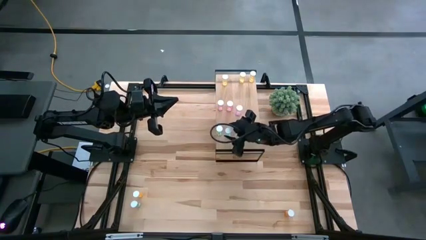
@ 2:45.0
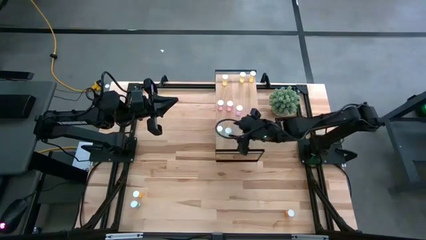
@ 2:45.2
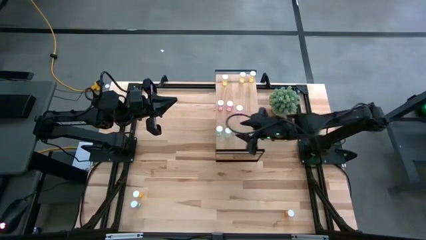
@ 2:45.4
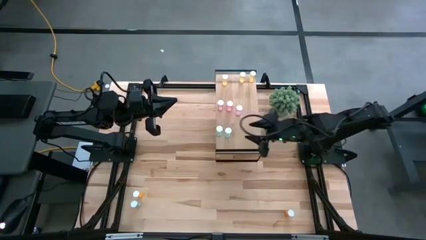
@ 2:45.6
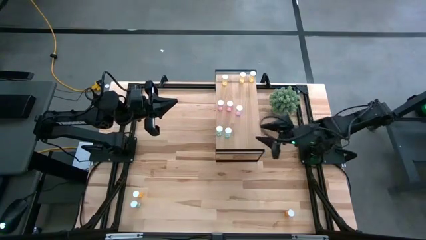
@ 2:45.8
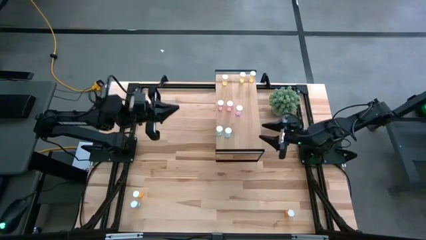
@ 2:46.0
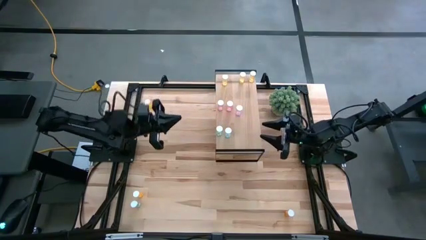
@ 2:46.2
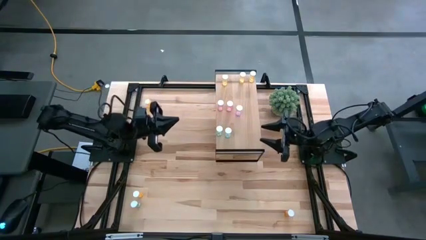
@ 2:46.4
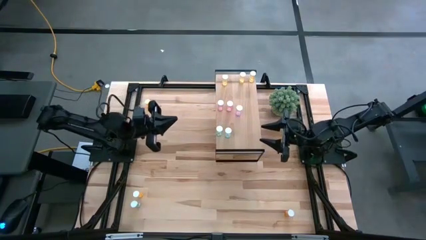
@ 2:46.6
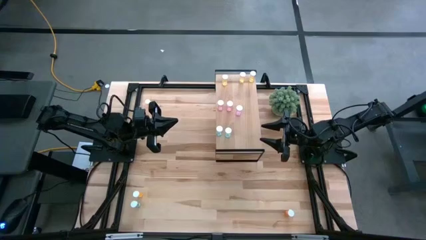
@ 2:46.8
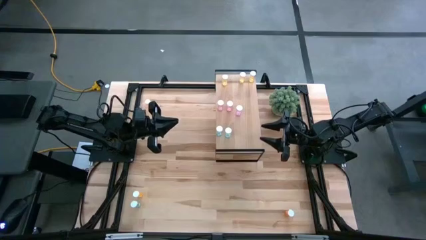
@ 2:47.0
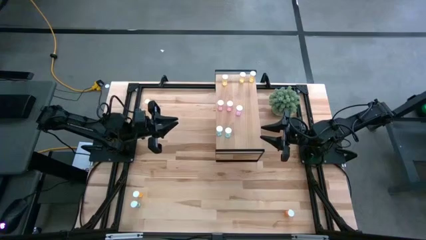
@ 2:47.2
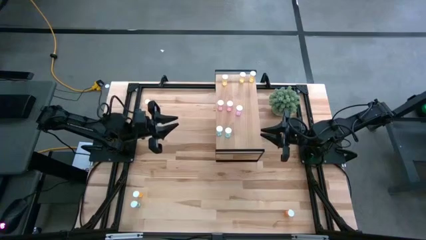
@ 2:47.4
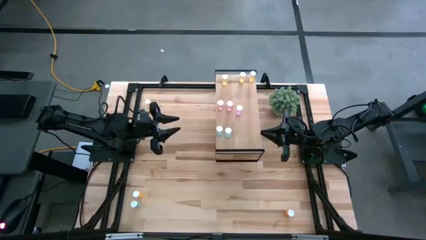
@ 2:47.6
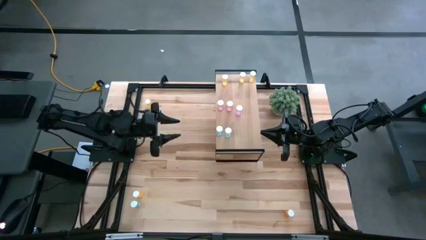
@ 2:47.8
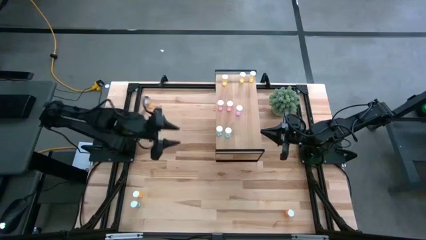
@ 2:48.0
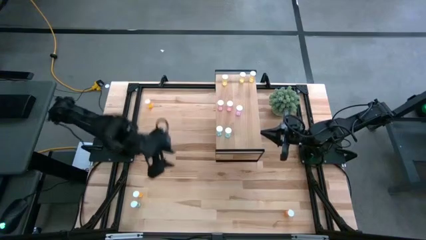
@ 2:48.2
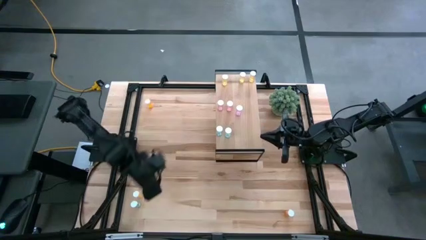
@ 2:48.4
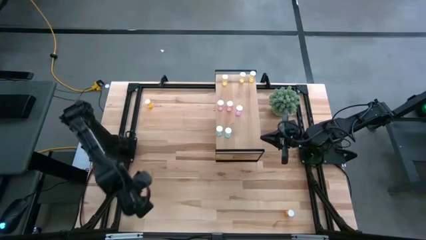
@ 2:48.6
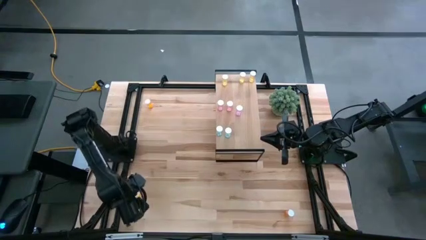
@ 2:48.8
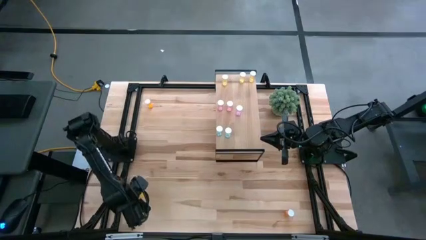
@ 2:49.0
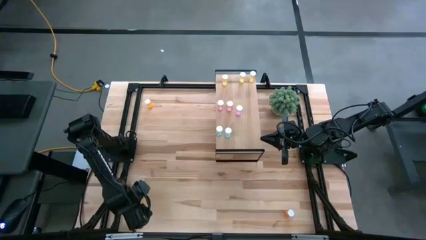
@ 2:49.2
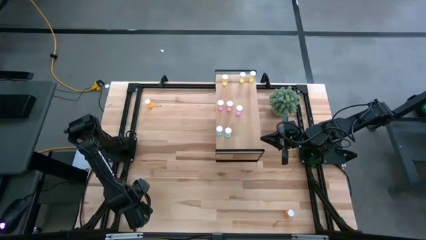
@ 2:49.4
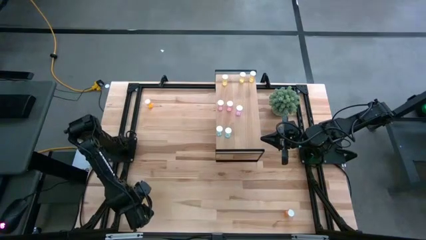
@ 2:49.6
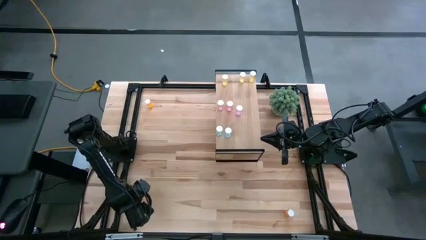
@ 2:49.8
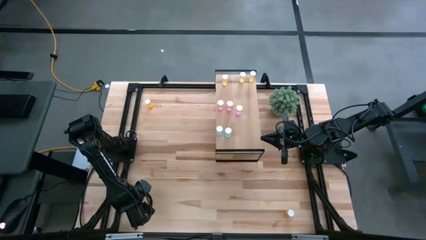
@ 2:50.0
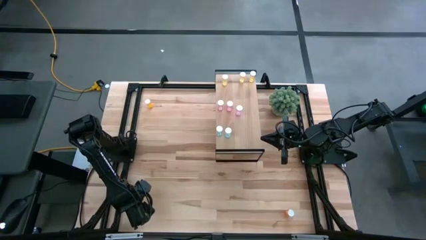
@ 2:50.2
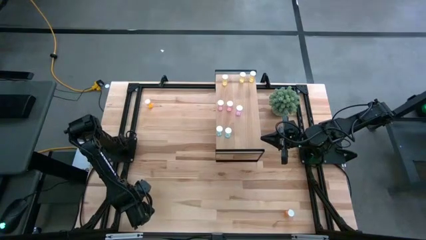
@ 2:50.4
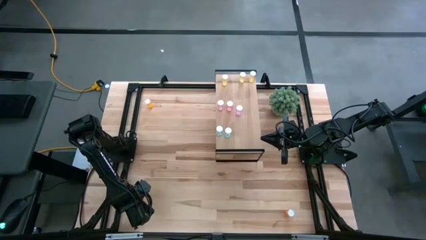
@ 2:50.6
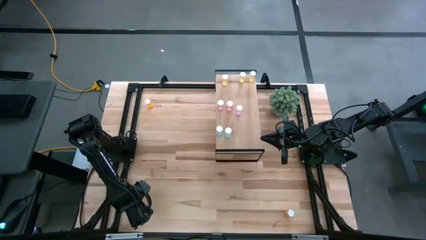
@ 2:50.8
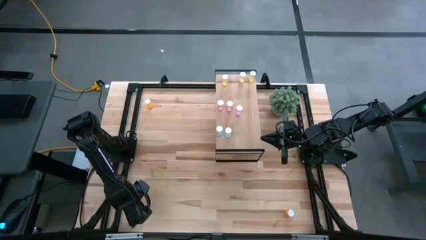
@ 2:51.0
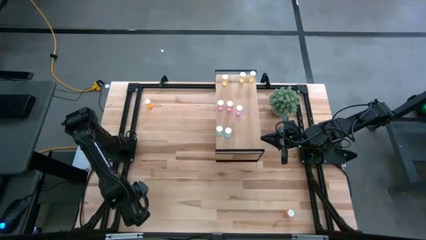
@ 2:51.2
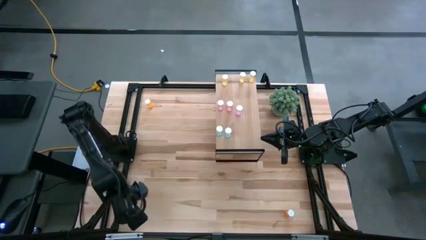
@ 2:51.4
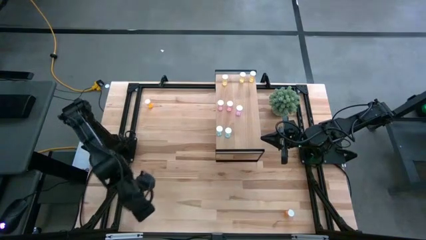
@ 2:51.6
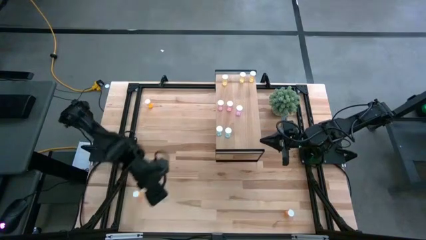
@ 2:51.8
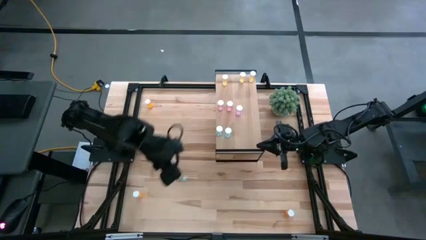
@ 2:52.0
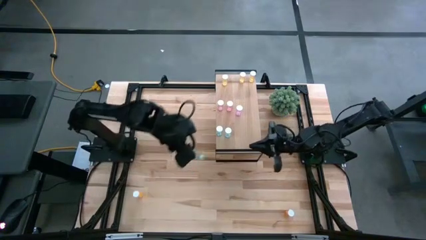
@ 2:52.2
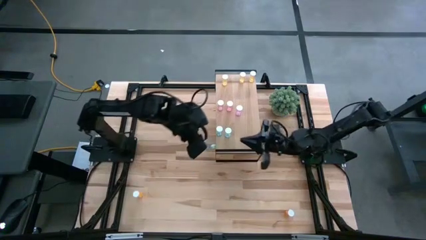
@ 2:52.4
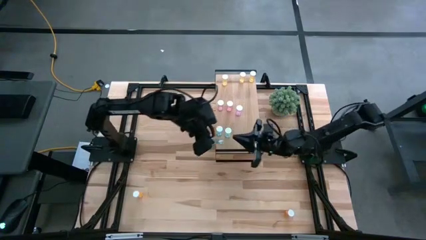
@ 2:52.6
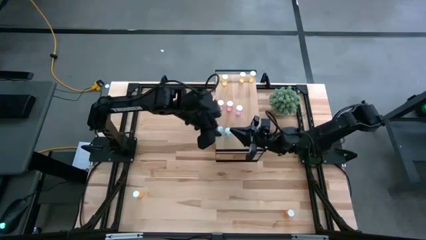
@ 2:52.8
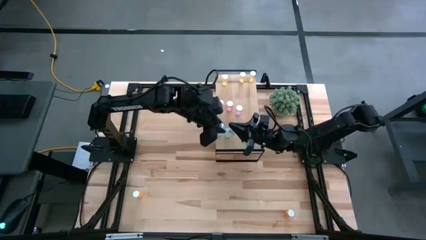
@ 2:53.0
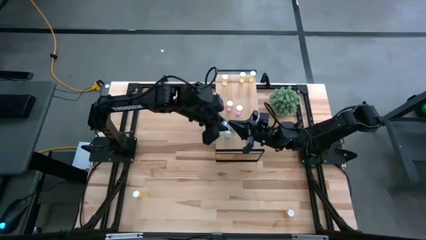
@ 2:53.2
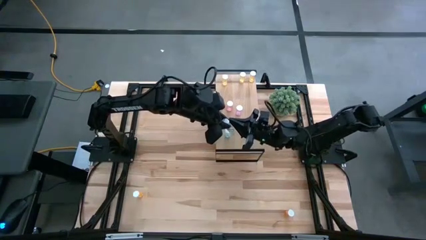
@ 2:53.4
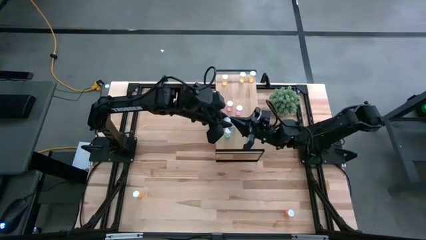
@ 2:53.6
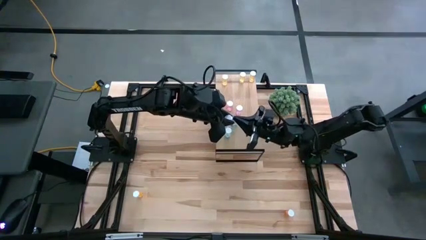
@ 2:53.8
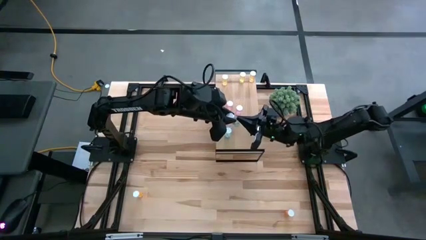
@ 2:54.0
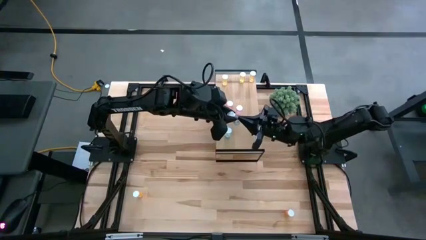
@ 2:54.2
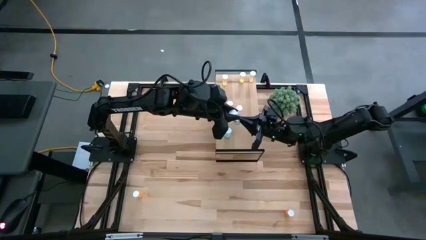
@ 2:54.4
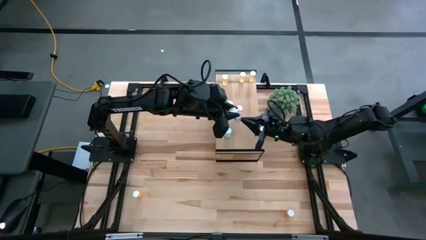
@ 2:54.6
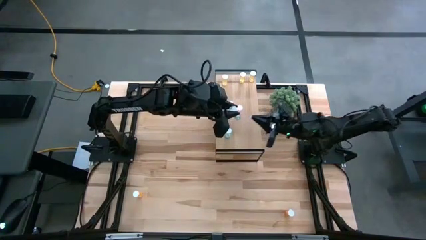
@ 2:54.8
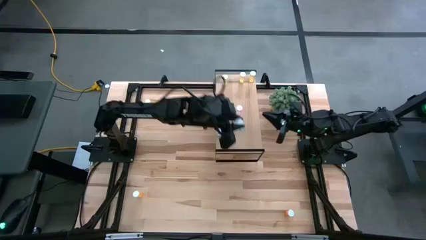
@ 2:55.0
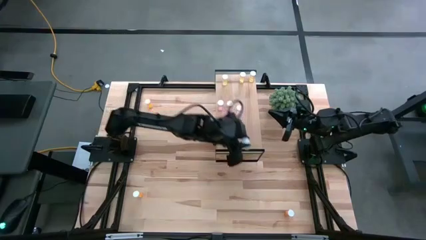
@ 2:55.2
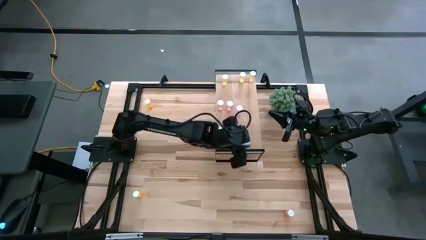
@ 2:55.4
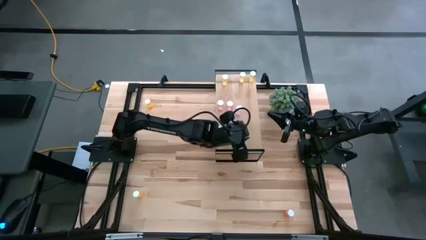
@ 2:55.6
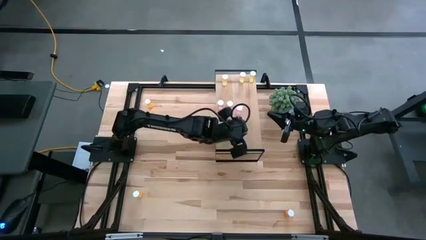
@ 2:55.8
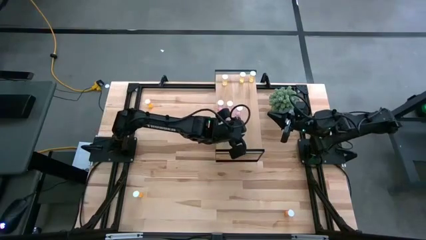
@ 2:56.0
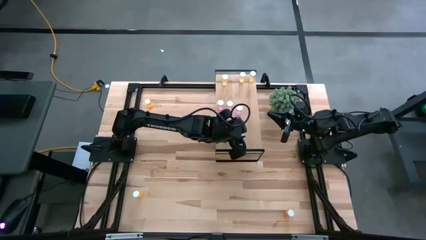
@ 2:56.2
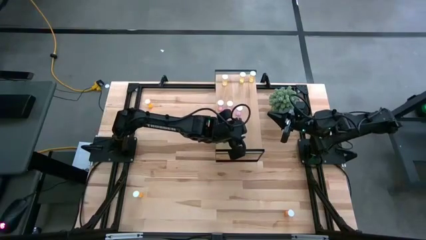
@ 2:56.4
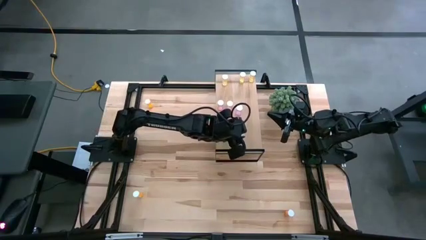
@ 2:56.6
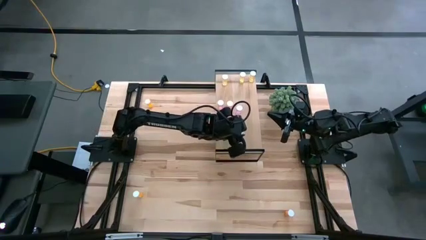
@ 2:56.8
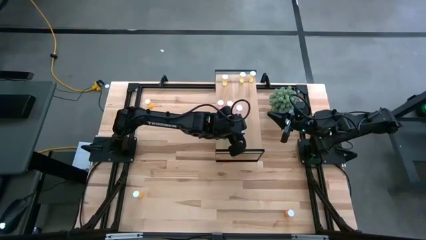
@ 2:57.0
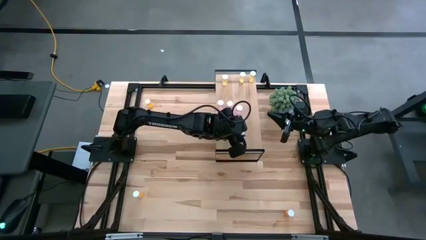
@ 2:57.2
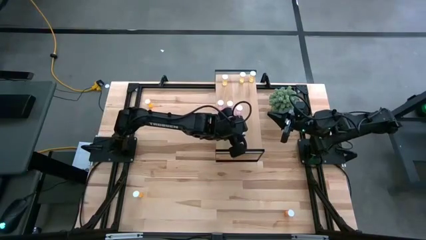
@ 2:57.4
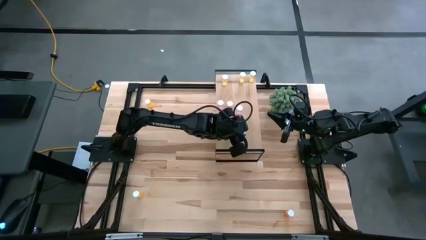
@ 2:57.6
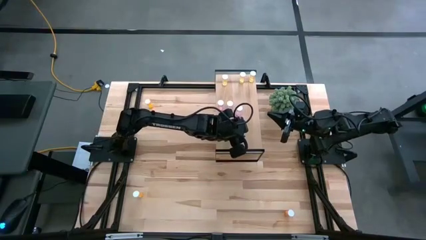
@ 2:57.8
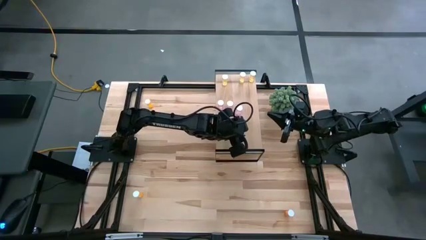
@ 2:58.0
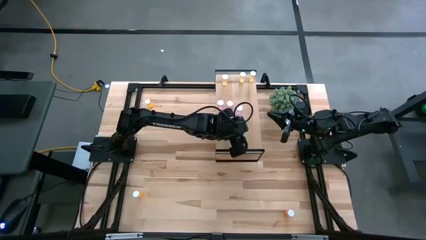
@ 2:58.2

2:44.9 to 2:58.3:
Task: Pick and place medicine bottles onto shelf by color
Put the blue pill bottle on the shelf aligned with the other blue pill bottles

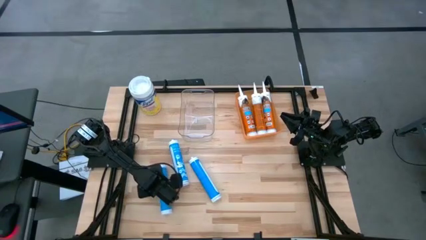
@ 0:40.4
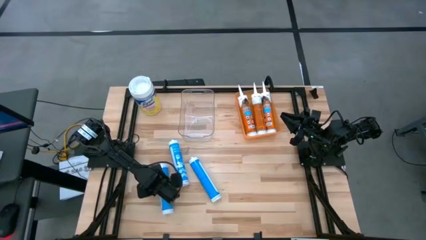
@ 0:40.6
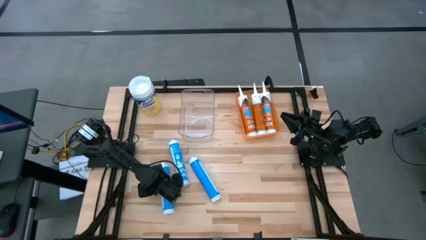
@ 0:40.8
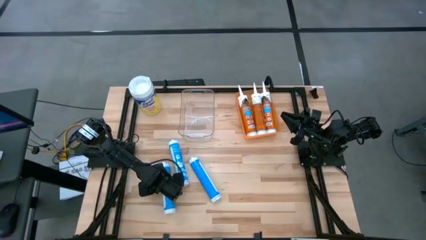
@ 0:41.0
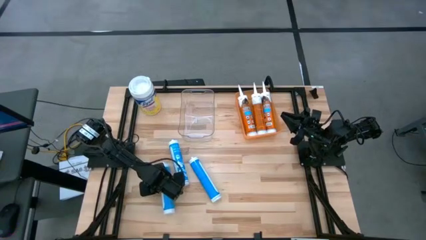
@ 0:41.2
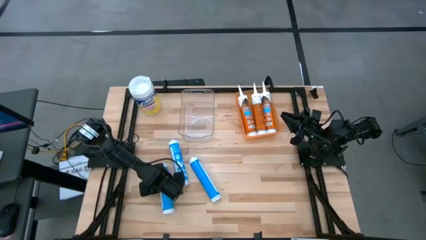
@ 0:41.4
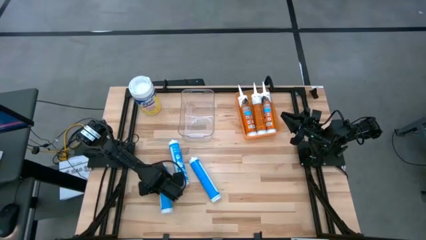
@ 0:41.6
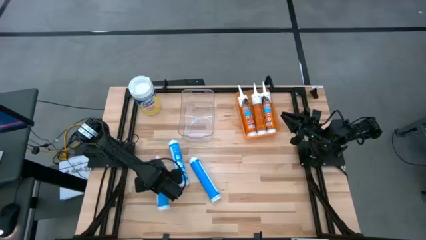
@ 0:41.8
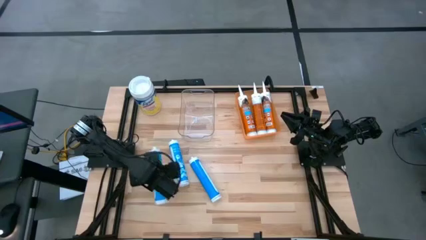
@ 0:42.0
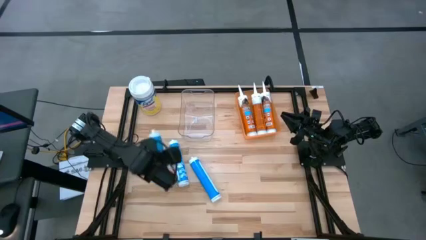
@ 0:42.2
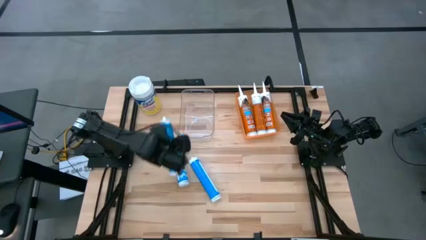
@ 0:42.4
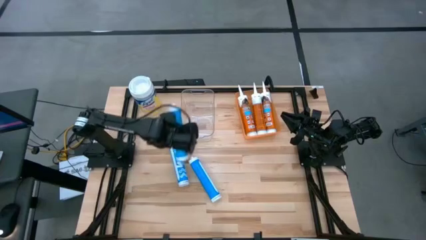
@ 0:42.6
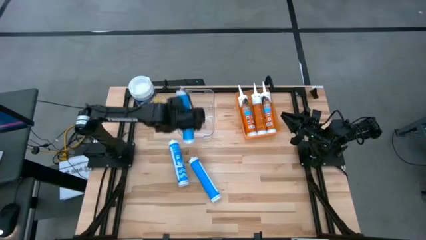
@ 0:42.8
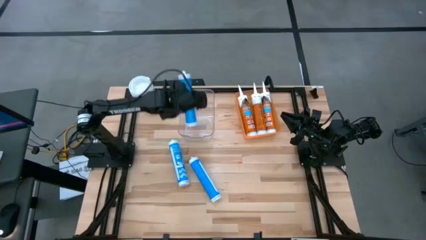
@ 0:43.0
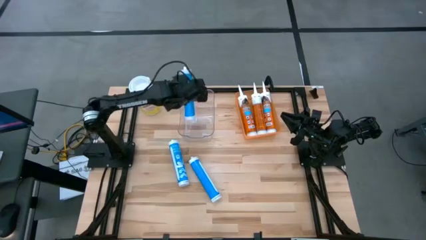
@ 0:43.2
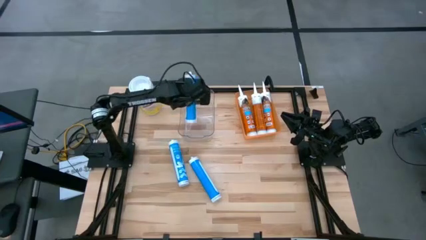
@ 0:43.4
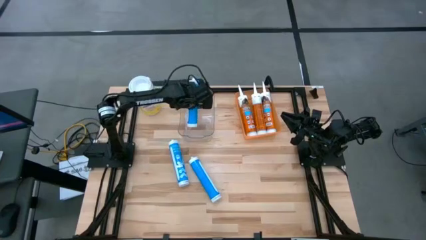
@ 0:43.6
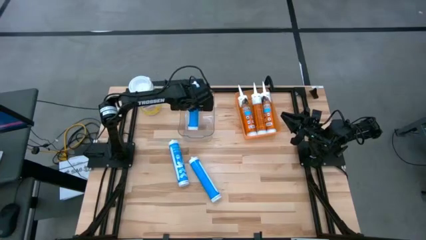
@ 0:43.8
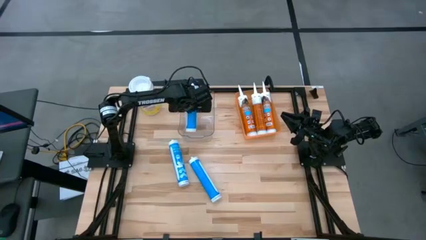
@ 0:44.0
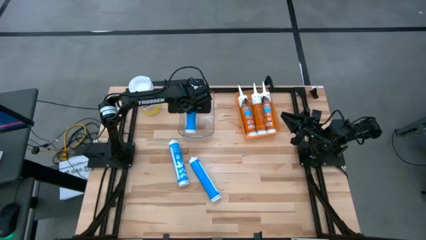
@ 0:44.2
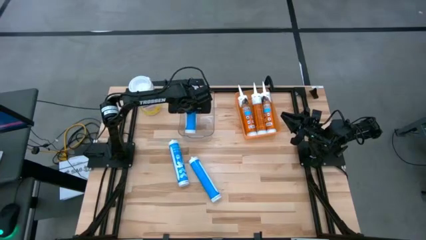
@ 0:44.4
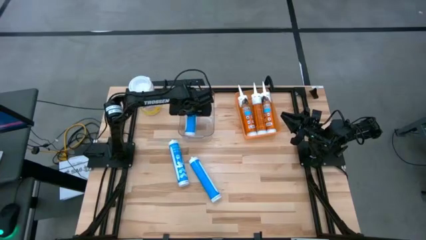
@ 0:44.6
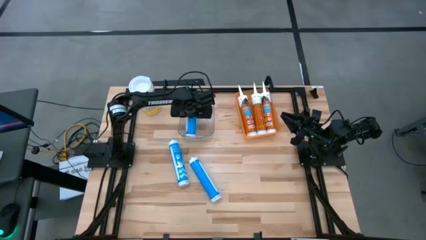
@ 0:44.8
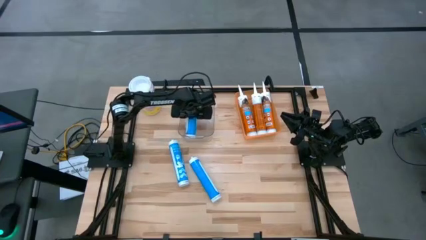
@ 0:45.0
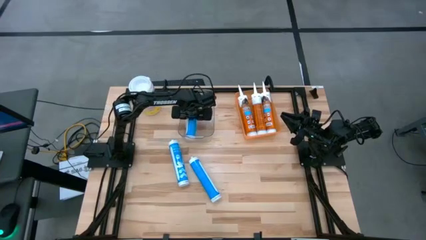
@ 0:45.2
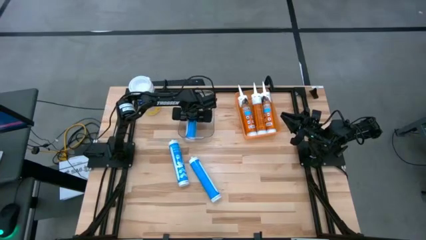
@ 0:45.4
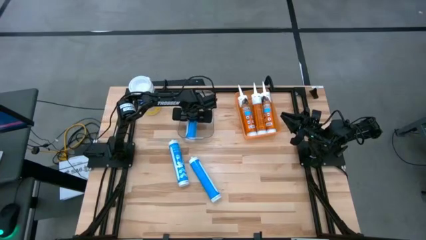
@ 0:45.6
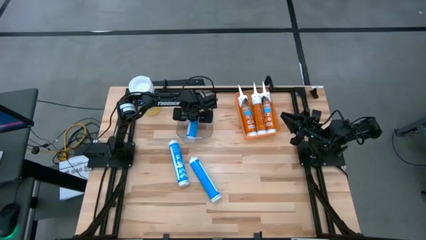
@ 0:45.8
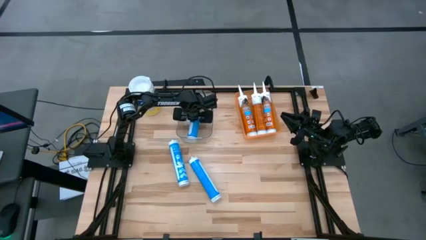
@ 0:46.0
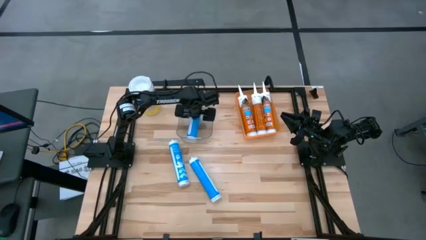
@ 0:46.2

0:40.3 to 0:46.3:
Task: Pick & place silicon tubes, Sealant and Lysol wipes
Put the left blue sealant into the transparent bin
